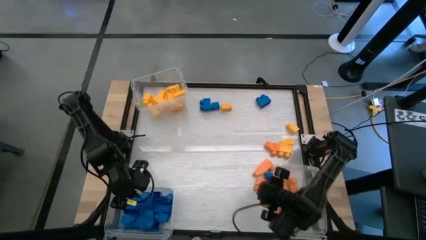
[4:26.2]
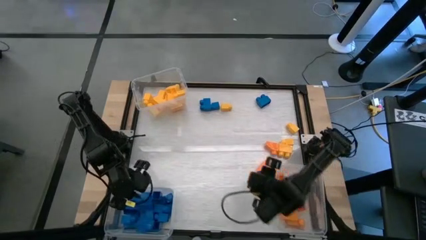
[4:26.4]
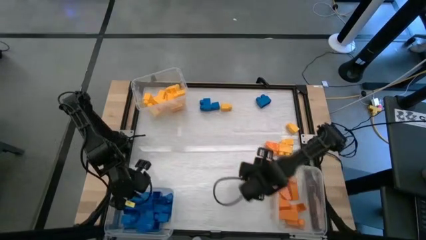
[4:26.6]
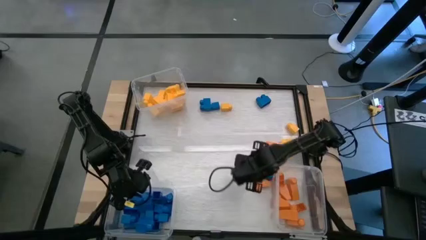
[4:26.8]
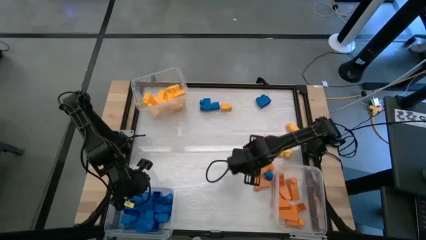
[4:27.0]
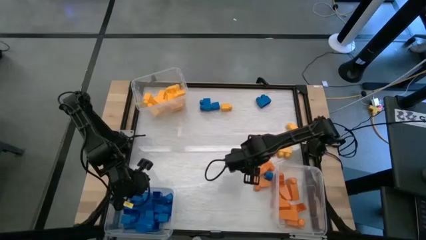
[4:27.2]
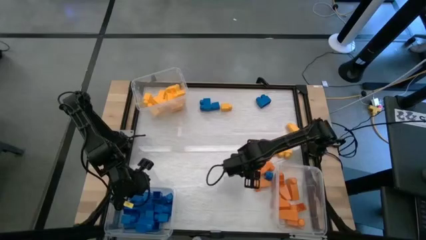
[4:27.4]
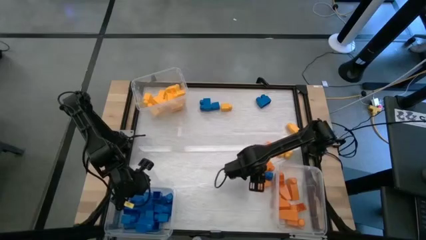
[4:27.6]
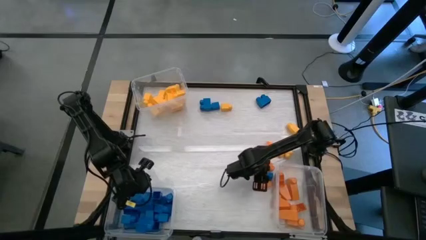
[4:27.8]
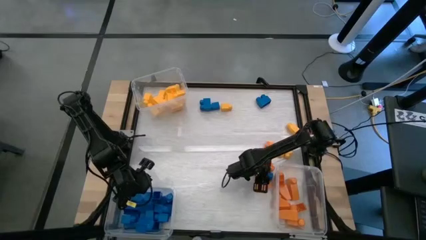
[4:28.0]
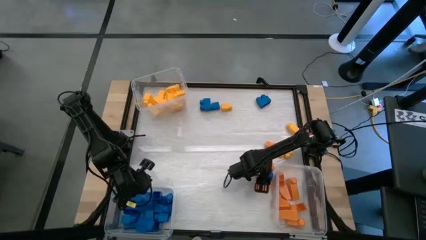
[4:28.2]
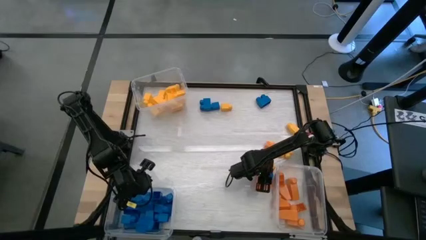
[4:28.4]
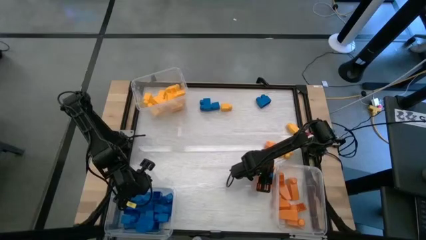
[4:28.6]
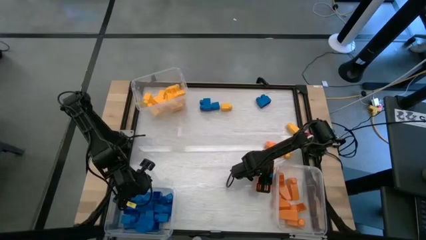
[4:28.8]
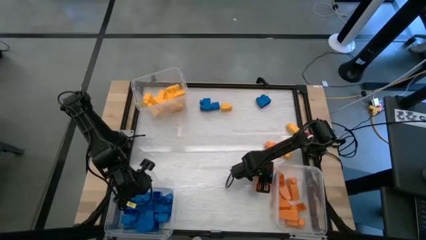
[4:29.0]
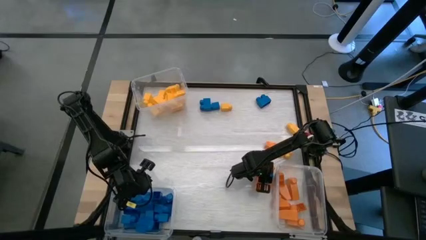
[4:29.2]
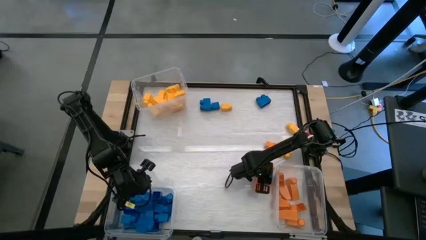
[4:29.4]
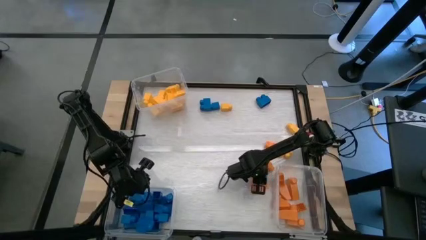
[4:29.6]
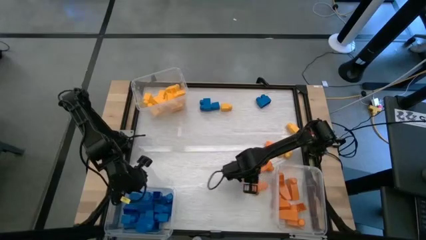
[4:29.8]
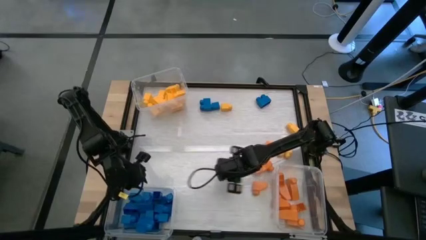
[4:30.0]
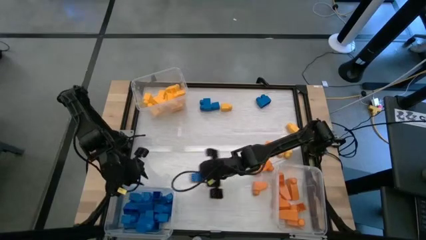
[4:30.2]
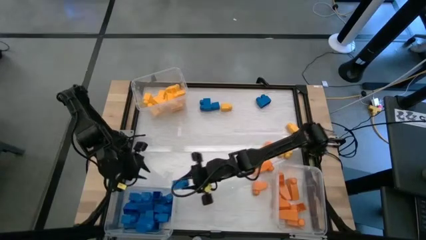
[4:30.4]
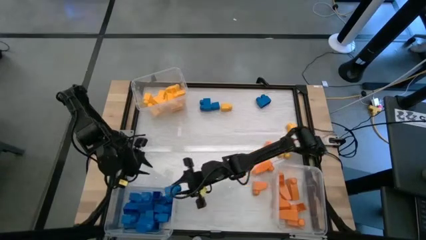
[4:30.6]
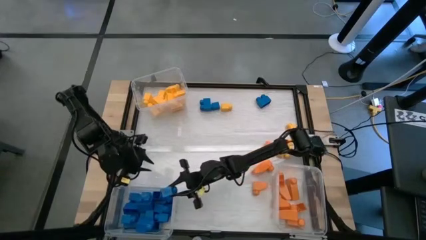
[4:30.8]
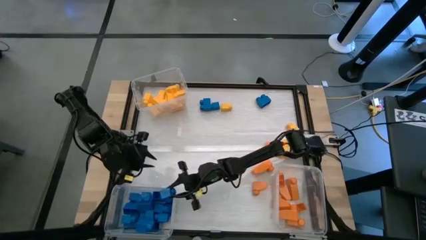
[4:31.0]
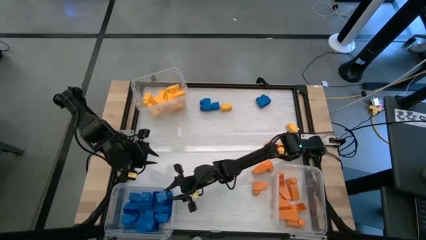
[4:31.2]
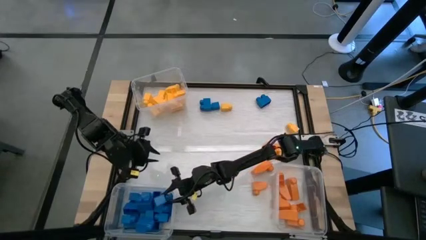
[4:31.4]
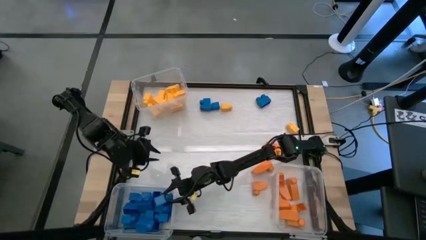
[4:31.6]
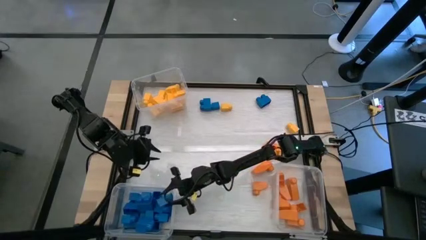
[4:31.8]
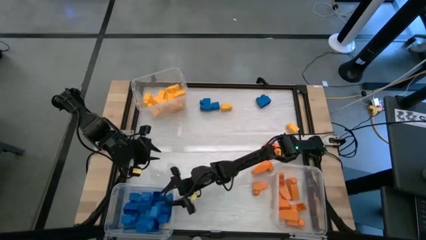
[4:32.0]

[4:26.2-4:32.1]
Task: Sort blocks
Put the blue game piece into the bottom left transparent bin

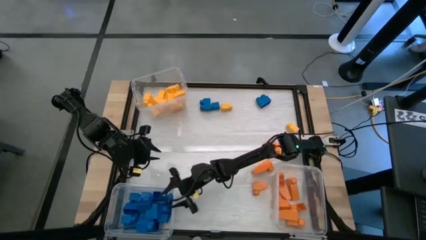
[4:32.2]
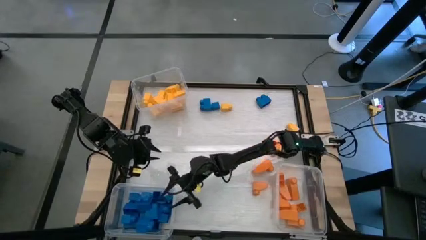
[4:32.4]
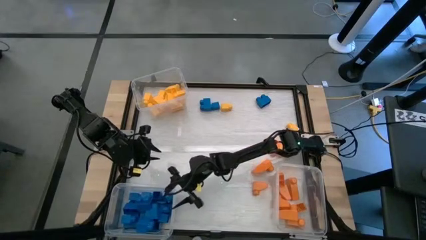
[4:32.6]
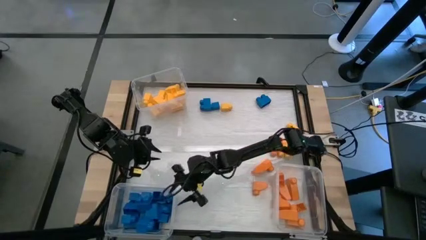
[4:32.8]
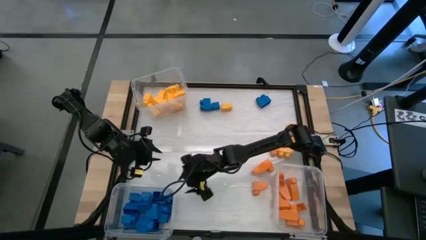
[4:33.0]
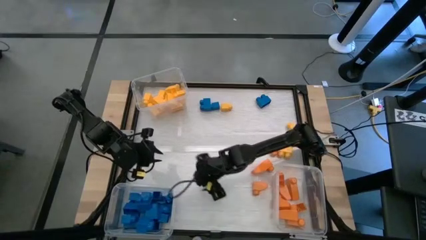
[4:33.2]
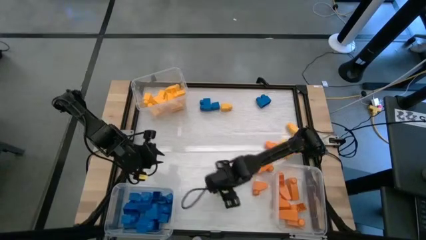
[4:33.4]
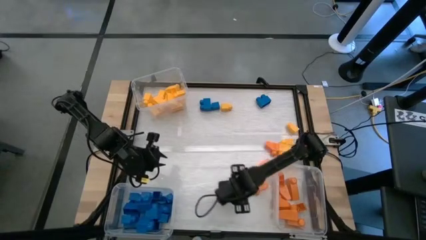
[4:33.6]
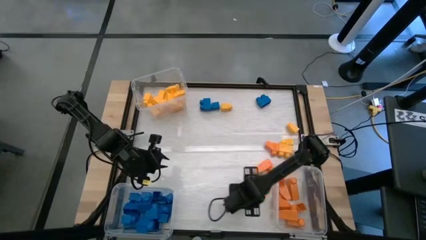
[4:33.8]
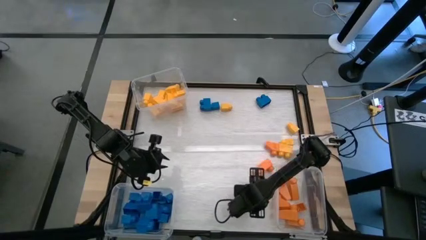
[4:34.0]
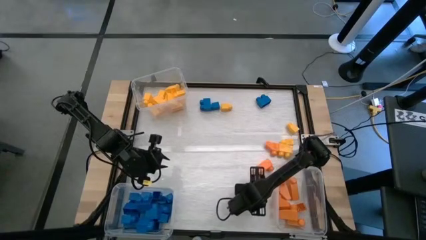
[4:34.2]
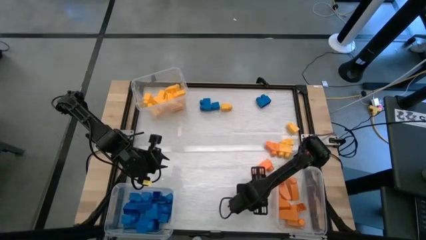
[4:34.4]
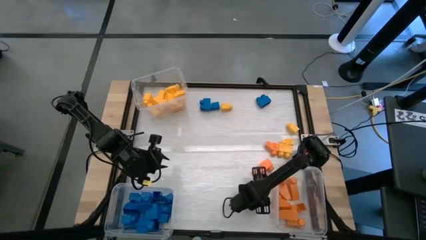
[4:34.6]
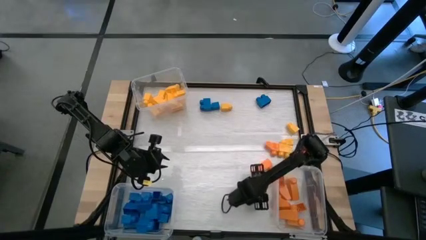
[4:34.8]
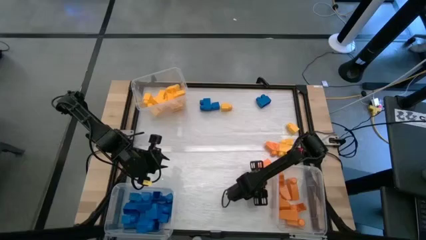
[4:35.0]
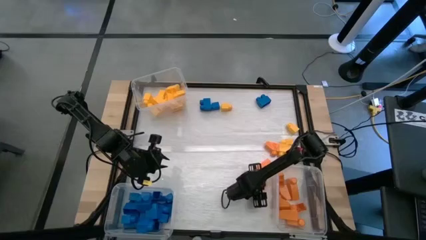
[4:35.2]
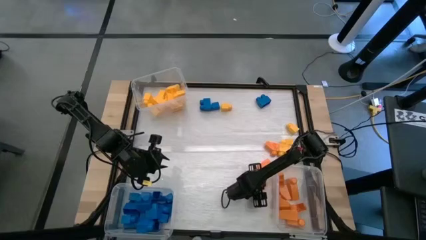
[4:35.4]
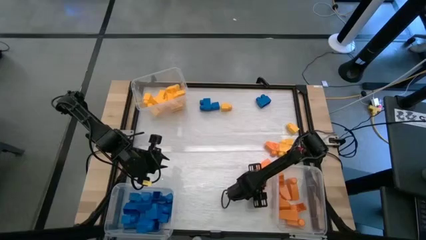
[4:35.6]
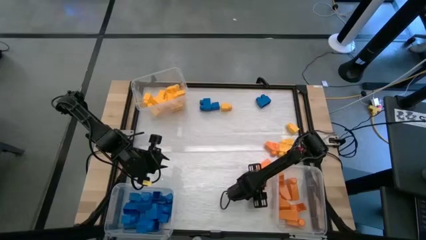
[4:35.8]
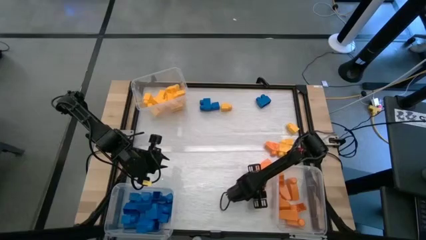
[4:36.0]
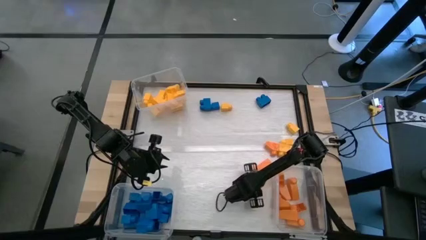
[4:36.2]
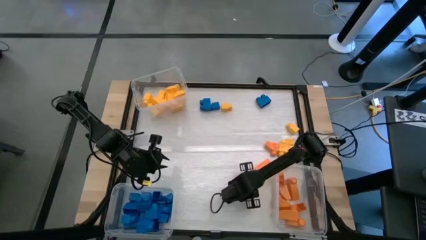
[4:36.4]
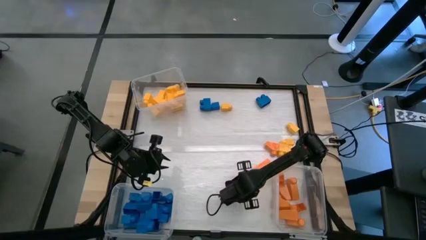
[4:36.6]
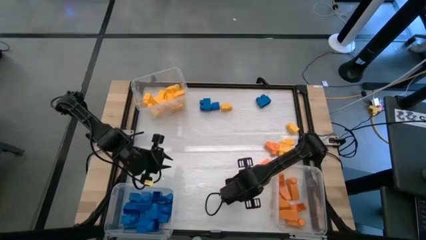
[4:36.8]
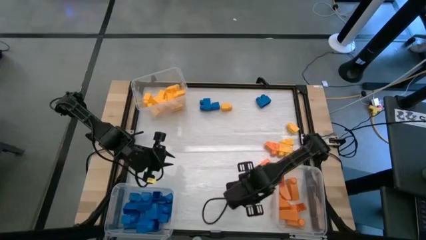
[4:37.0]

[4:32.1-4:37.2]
Put the orange game piece into the bottom right transparent bin

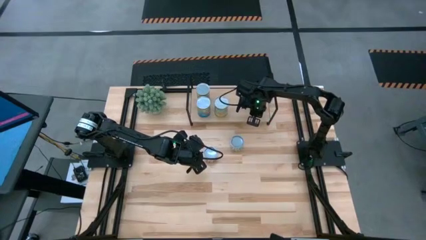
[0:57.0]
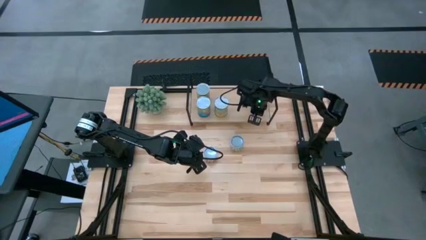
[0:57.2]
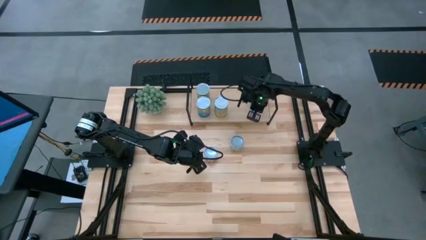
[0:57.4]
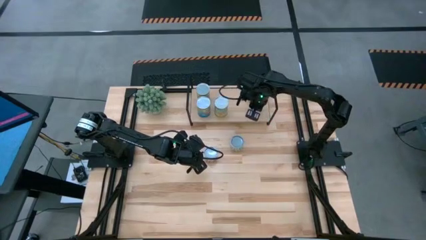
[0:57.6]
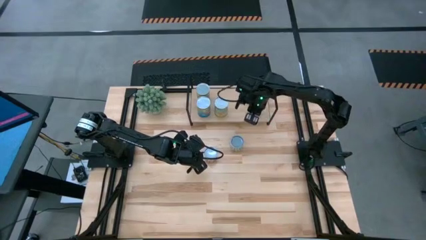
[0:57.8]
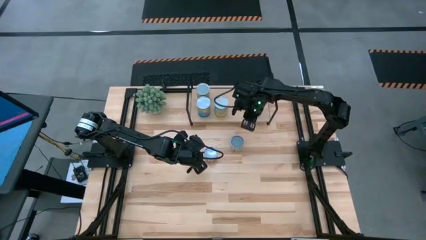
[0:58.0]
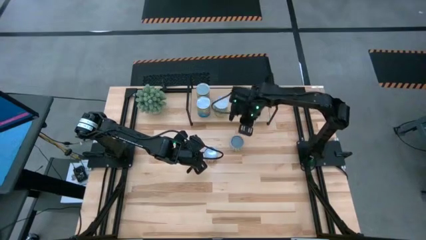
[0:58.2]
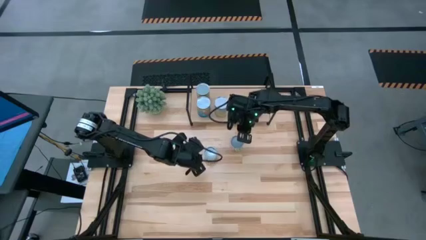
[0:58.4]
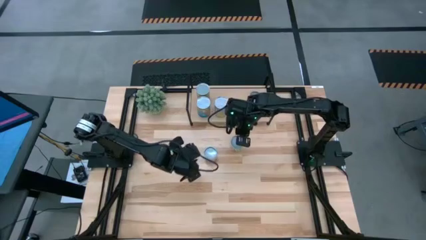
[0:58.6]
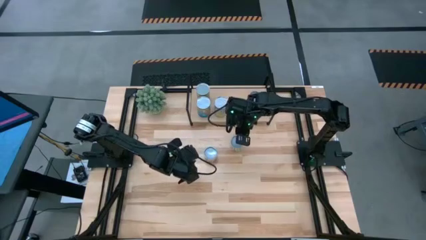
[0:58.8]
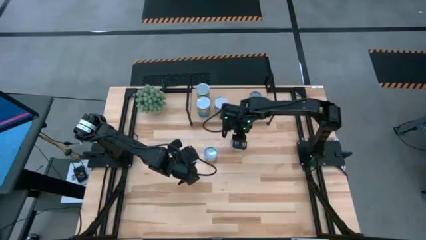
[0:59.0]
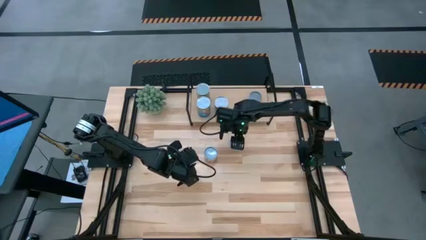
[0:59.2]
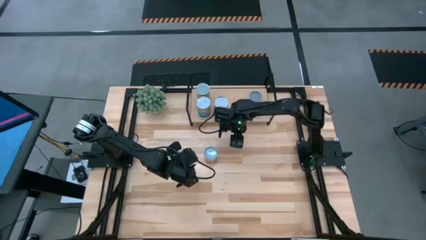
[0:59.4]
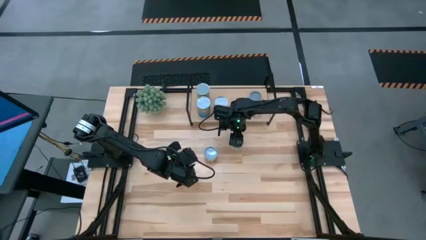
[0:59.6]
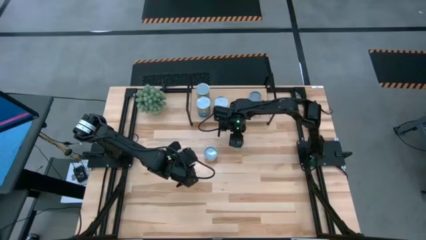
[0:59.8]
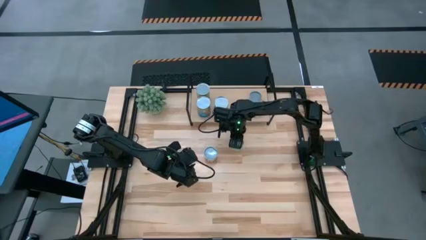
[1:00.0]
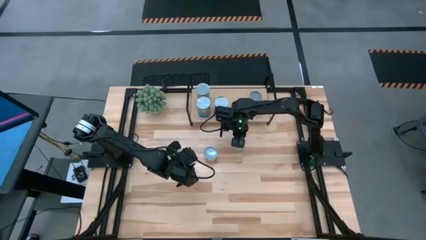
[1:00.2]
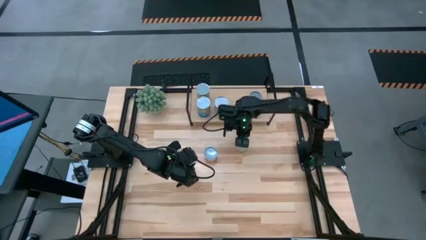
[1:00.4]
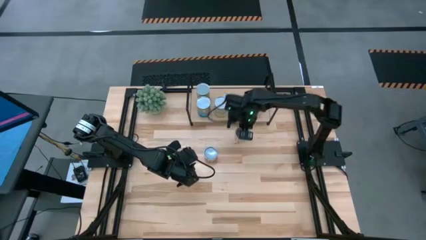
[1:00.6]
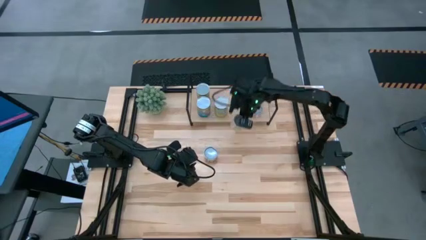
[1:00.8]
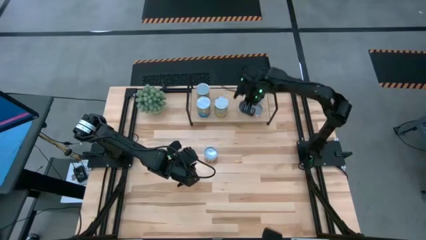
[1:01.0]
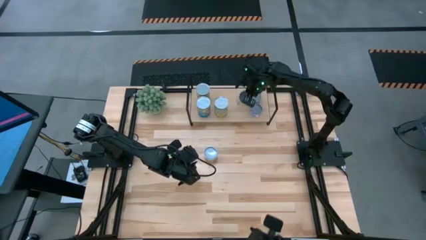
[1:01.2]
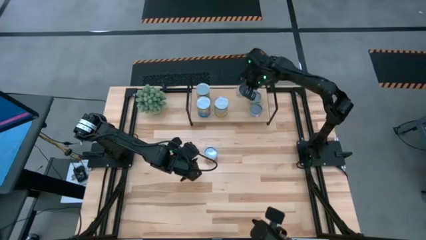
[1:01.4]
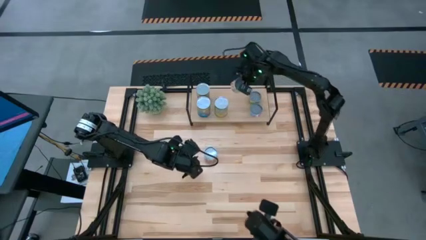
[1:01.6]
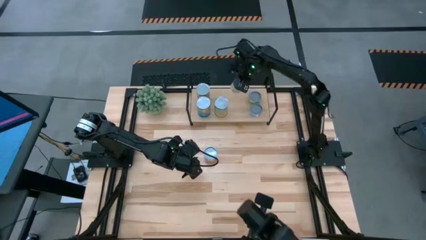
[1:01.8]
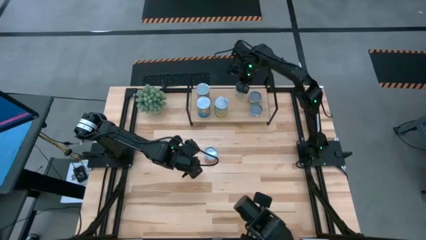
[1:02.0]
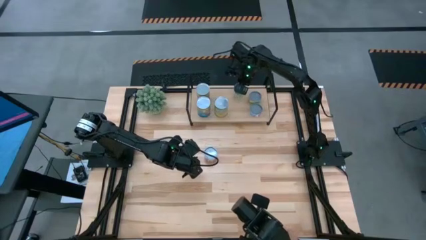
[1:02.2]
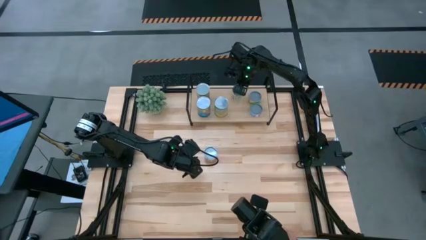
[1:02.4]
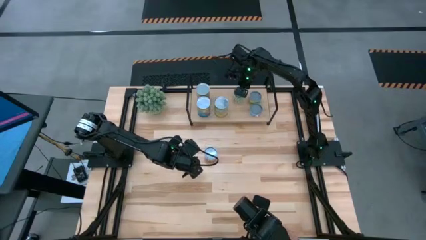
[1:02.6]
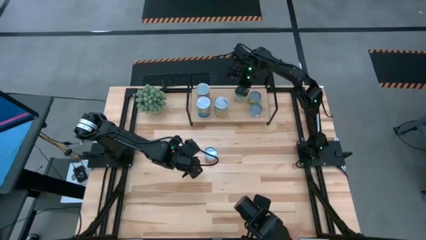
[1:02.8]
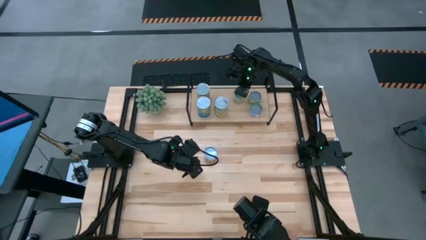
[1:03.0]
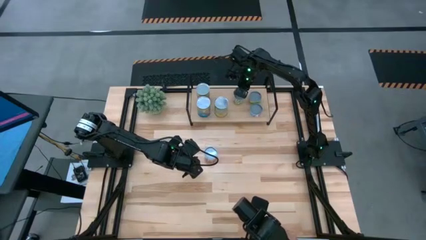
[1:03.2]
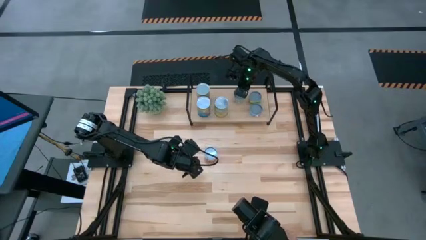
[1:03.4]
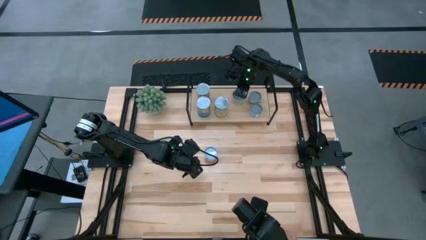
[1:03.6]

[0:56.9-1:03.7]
Task: Pick and place cans onto a shelf
Put the canned peas on the shelf
